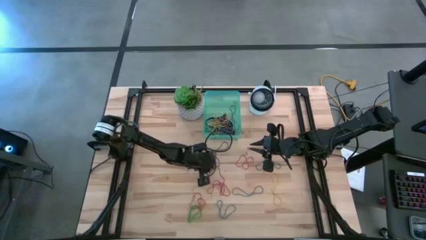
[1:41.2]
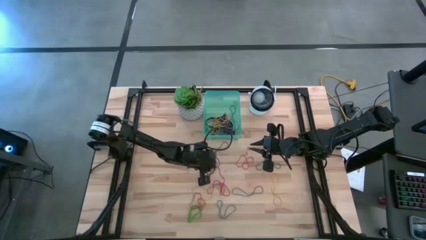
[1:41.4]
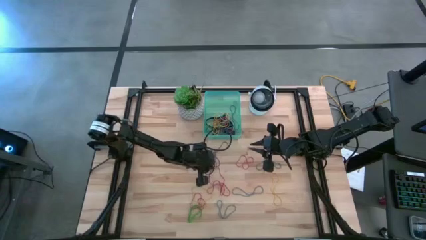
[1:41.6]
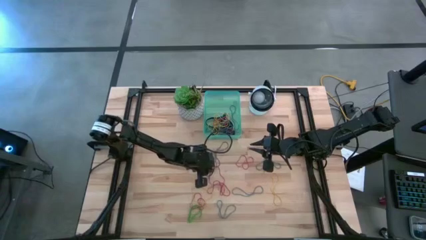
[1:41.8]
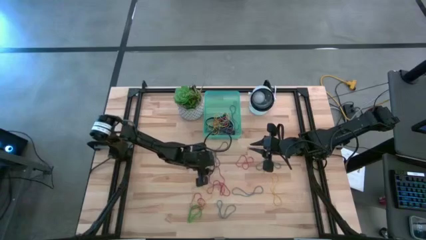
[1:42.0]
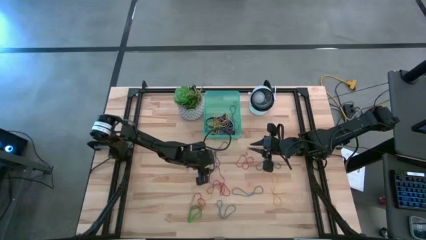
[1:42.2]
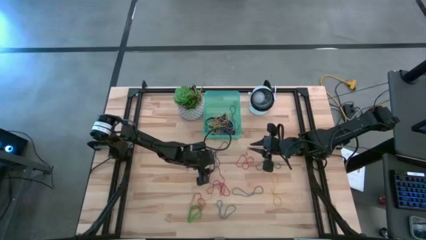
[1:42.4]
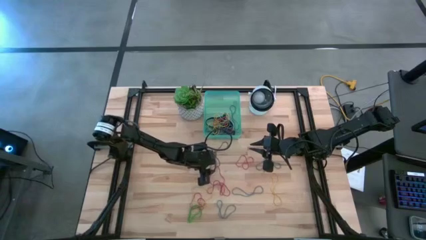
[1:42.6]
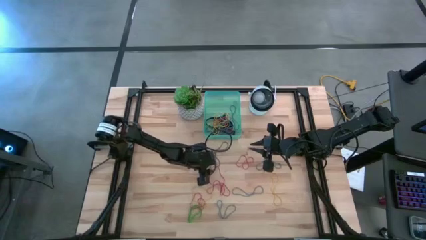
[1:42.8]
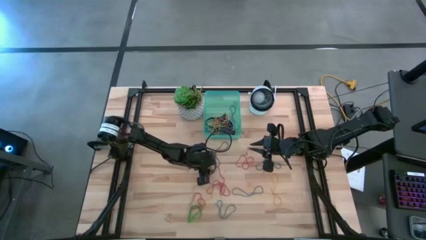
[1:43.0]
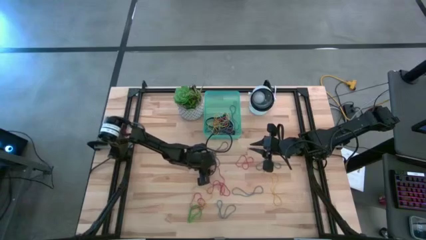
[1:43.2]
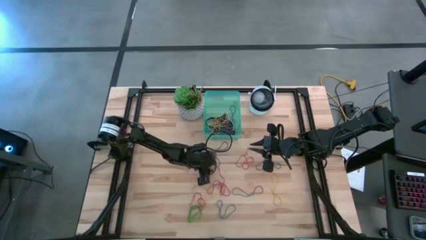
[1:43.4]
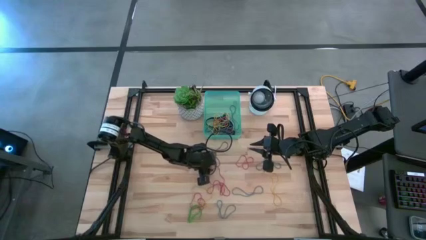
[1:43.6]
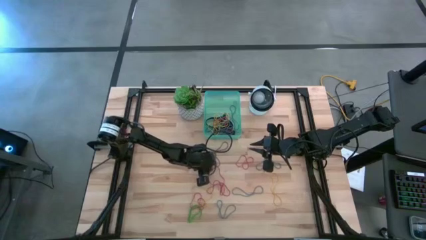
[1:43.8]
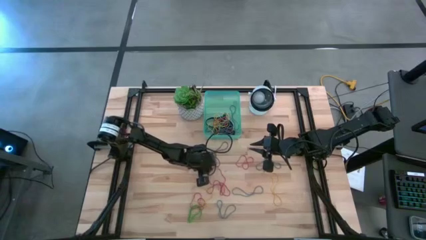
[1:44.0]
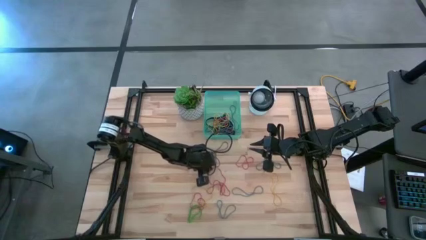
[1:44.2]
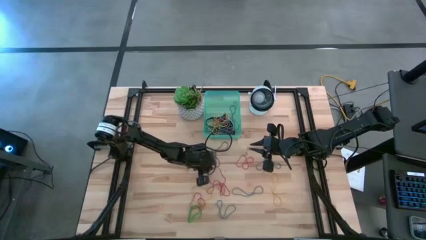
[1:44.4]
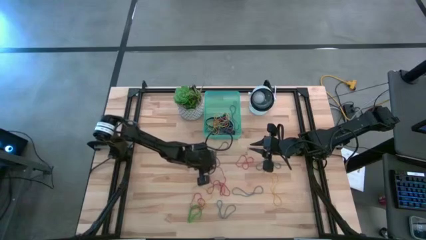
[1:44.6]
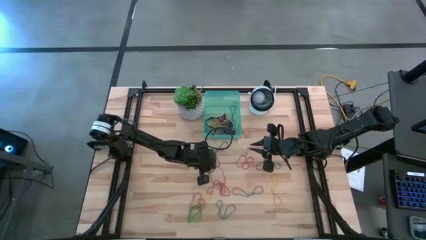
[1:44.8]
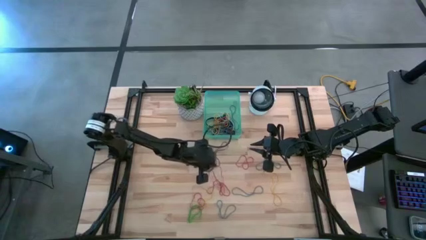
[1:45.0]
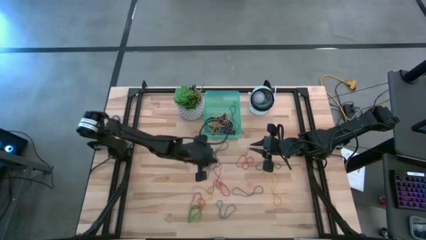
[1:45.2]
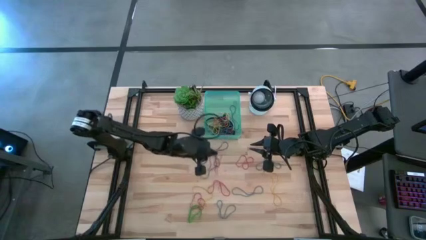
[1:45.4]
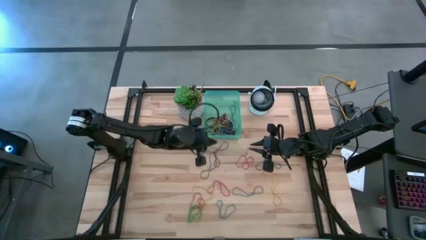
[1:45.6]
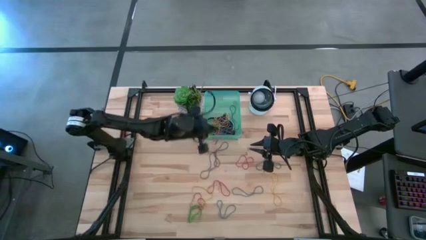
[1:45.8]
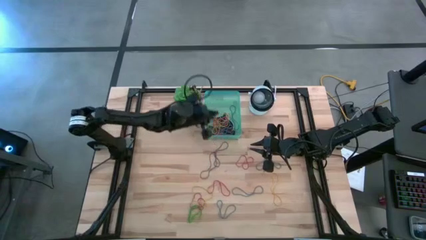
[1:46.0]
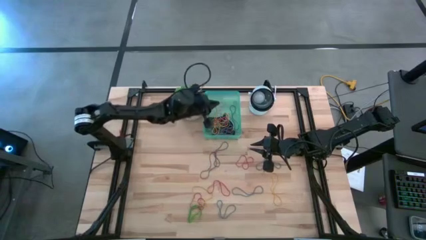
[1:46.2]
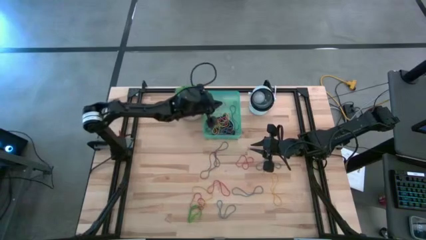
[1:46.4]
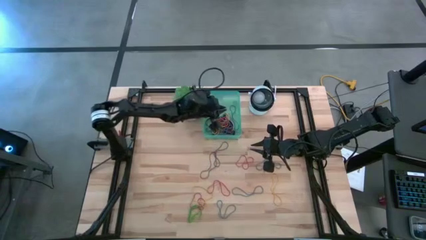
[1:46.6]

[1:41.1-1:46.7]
Task: Pick and place rubber bands into bin
Put the red rubber band into the green bin

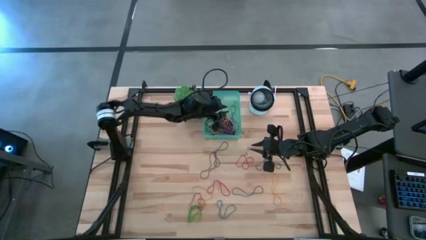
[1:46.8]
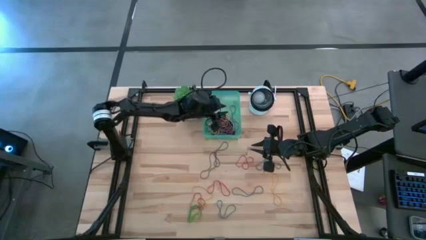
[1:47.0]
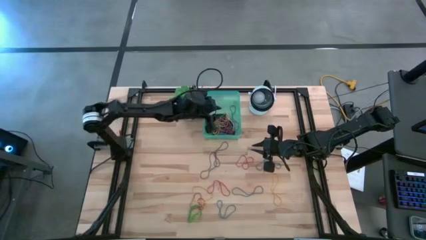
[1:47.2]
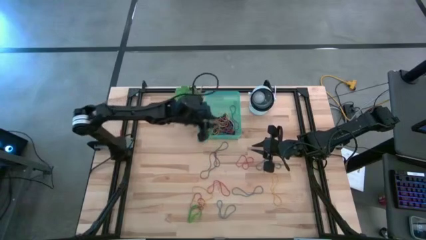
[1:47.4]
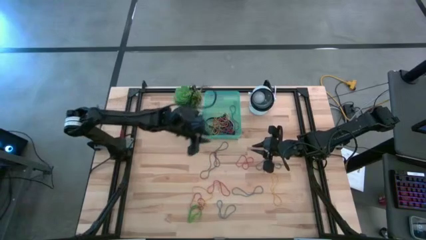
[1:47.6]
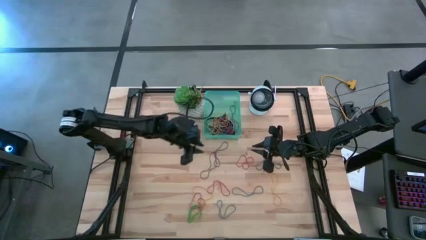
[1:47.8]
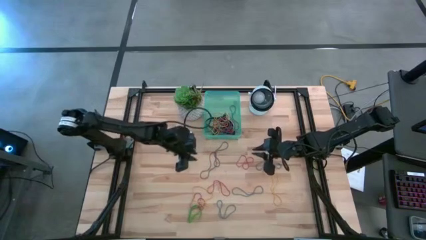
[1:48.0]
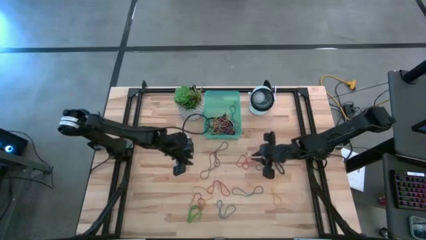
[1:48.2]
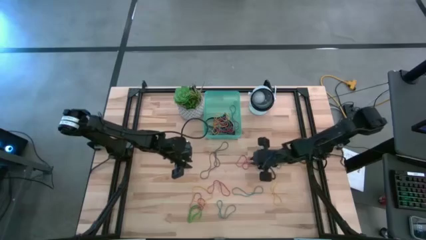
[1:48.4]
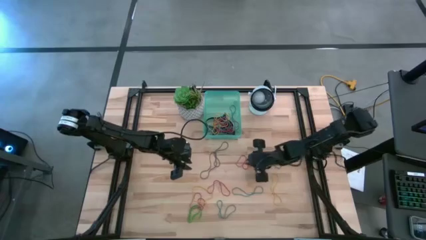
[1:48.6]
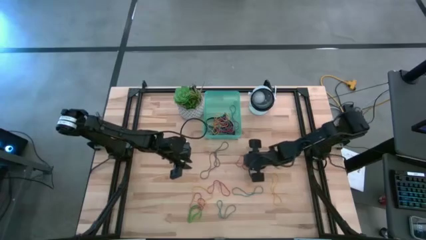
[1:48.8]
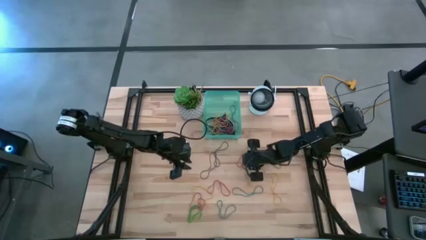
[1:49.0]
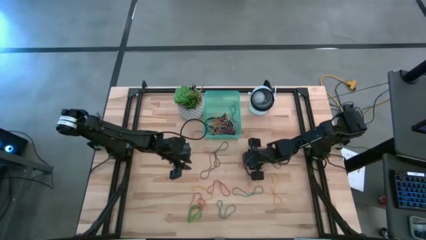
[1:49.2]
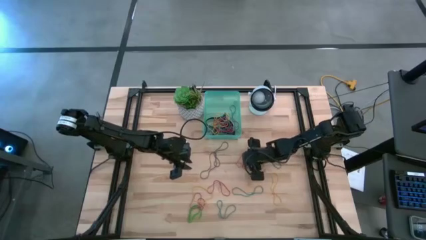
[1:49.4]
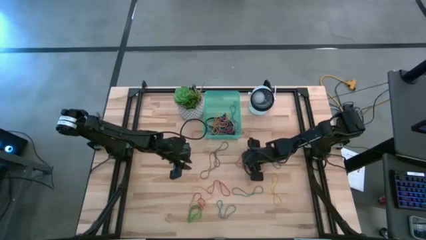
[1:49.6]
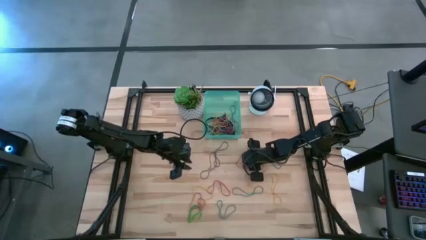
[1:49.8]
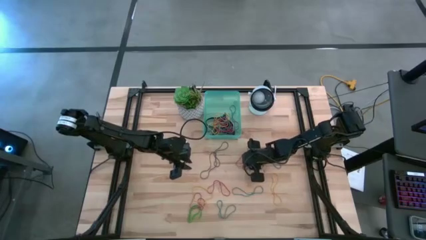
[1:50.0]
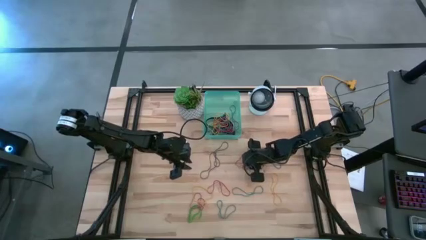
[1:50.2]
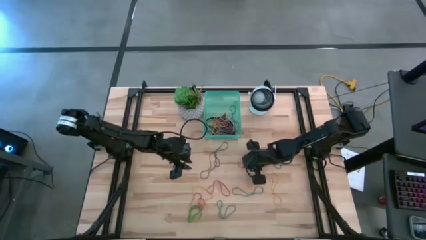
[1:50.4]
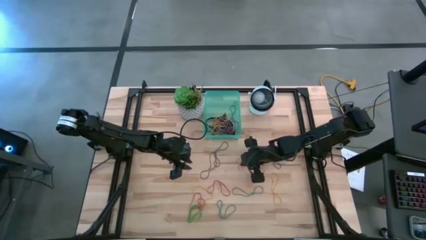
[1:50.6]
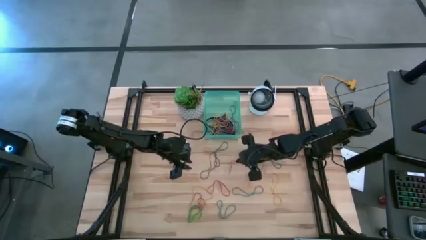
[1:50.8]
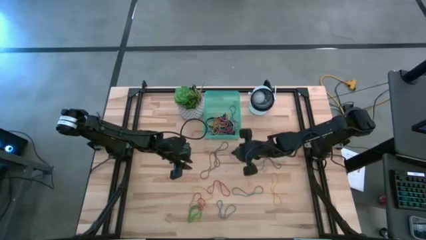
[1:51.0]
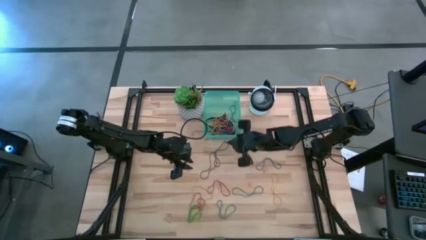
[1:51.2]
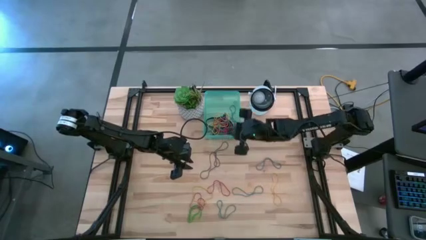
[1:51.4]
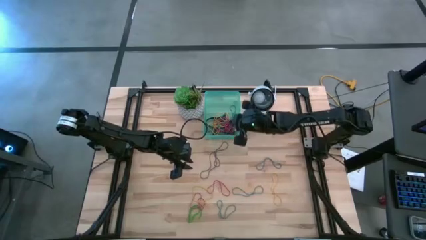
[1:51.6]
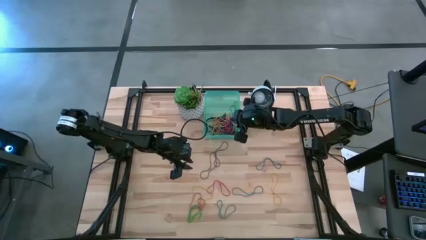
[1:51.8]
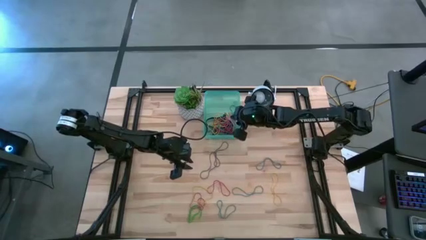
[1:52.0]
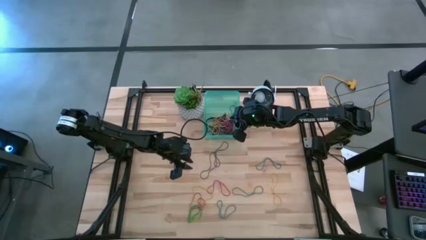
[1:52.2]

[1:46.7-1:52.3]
Put the red rubber band into the green bin

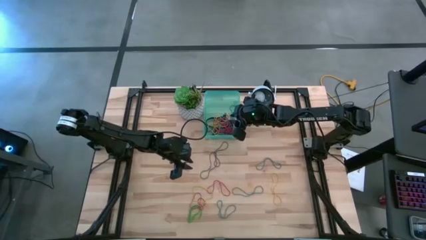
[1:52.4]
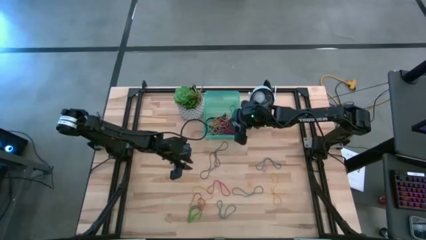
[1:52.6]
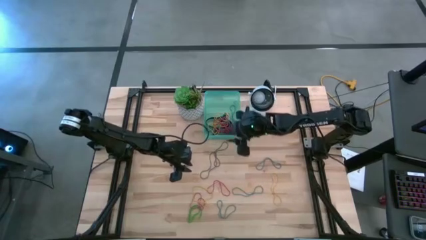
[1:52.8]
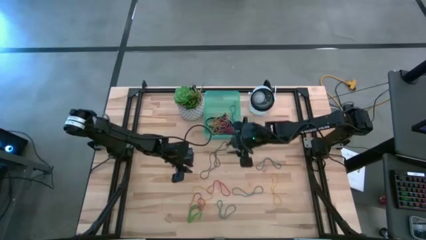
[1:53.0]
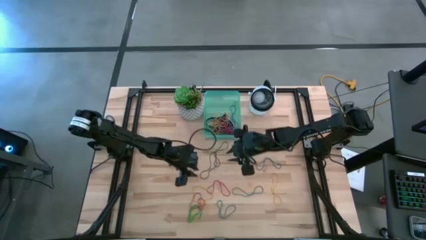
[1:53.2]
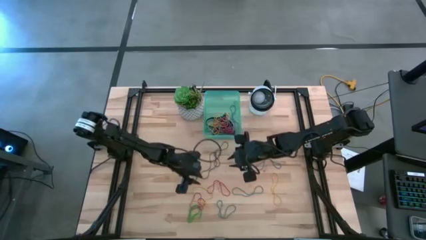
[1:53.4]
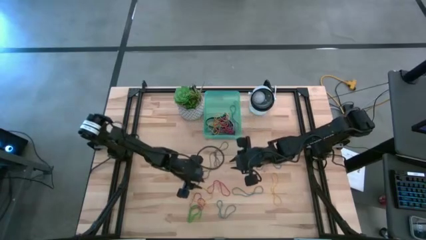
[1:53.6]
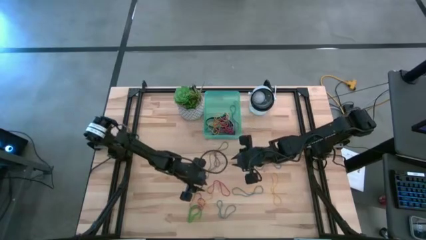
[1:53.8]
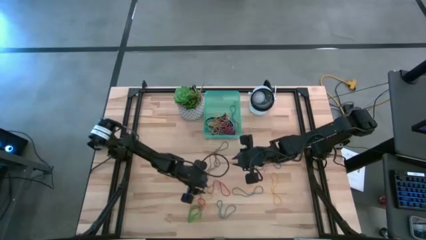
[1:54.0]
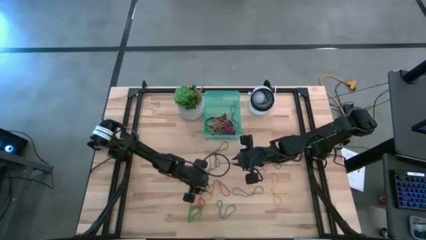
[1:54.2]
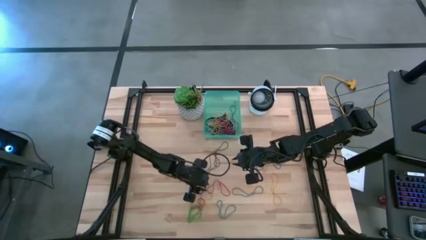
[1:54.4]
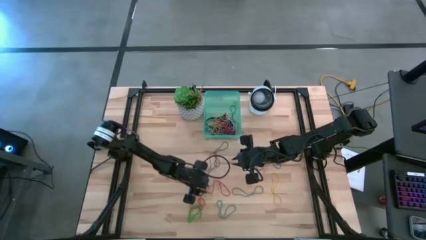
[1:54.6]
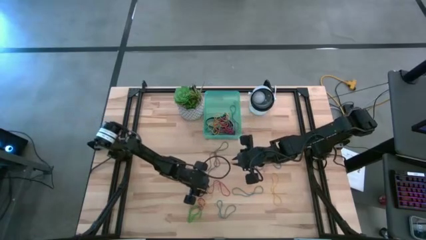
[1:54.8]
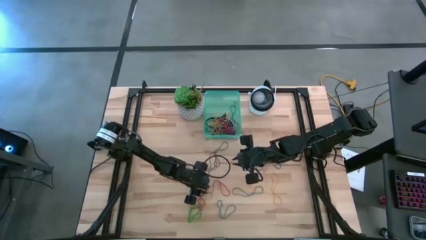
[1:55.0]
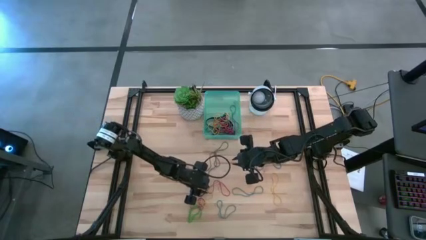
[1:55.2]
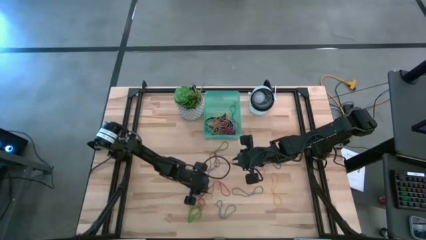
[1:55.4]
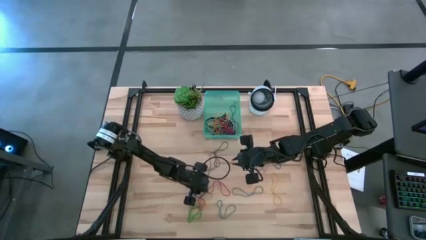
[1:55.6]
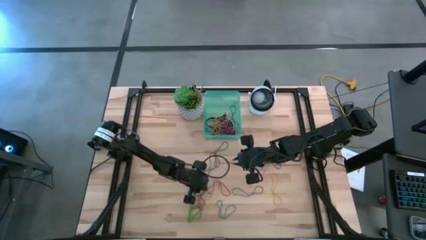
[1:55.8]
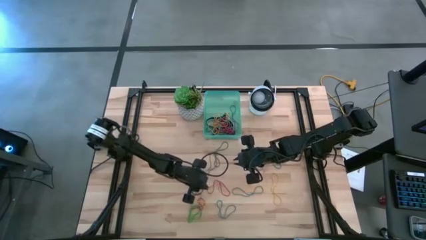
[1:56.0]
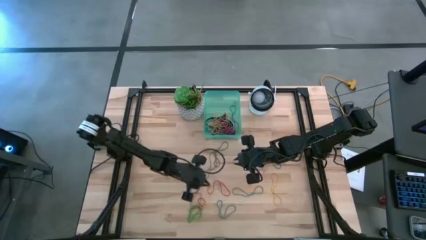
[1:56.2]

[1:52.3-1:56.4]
Put the yellow rubber band into the green bin

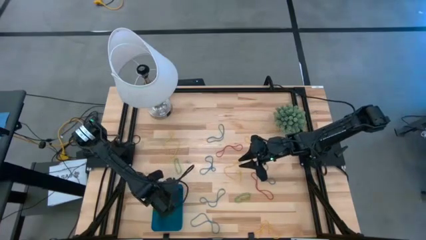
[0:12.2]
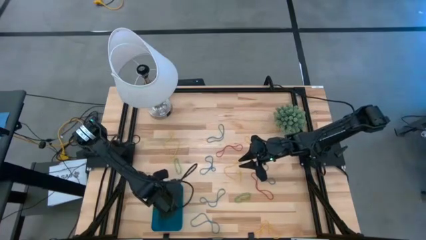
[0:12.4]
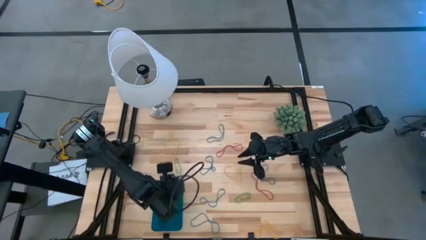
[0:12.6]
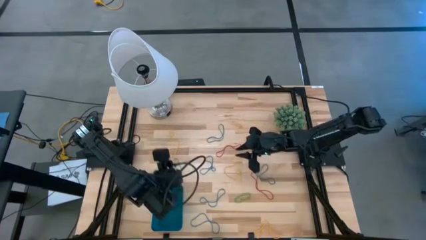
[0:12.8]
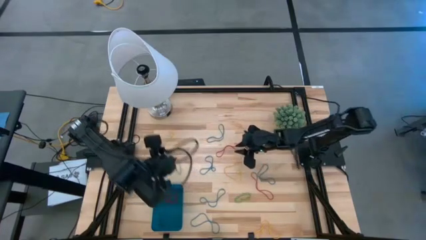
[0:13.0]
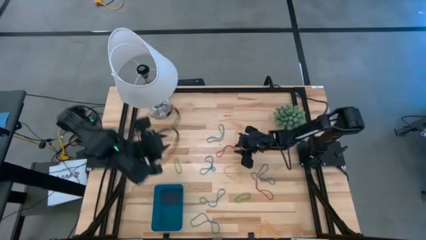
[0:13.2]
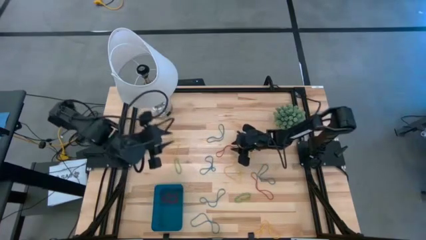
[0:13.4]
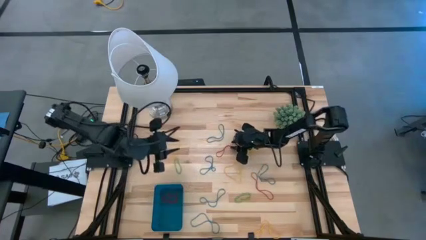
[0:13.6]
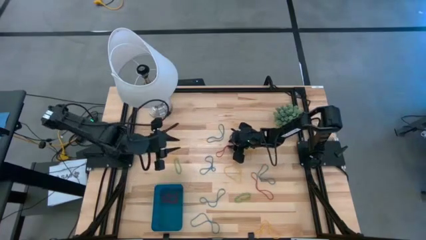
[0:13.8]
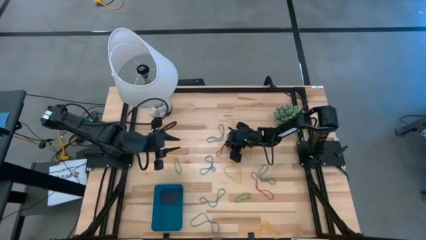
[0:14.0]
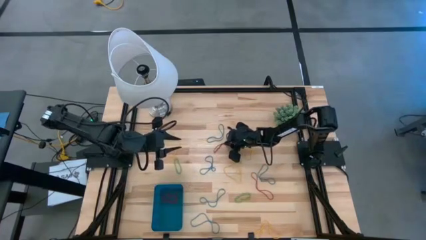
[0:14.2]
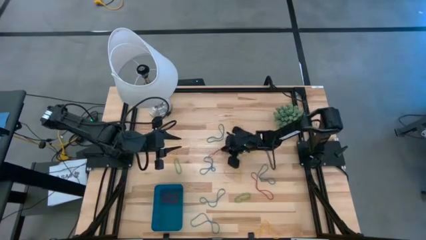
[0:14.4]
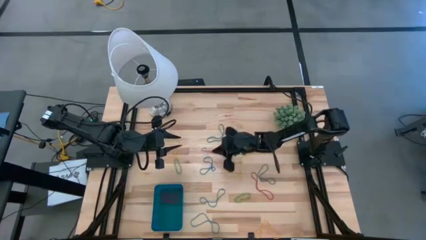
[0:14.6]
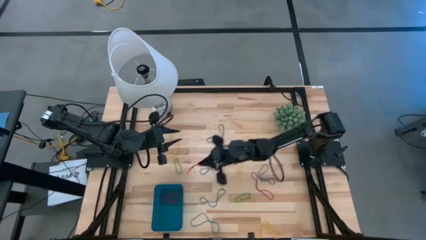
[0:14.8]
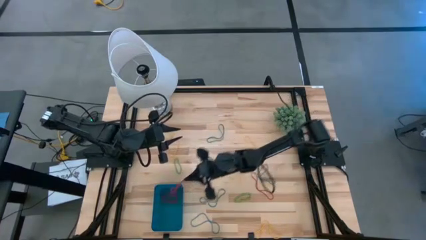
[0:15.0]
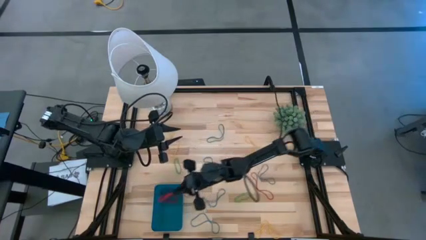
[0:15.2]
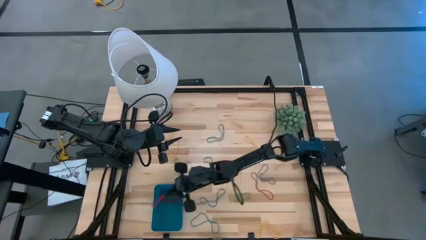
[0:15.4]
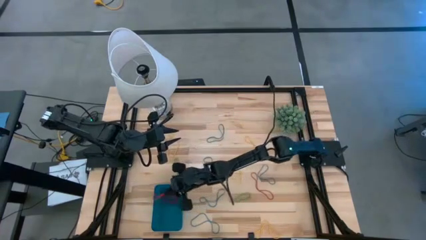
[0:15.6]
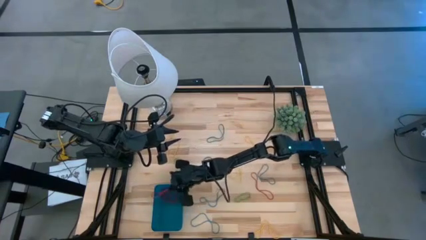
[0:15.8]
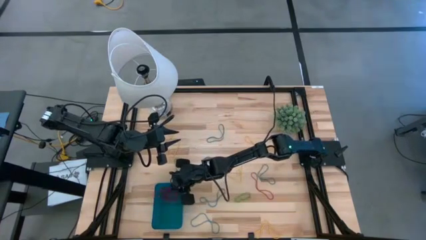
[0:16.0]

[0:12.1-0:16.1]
Task: Pick and place items into bin
Put the top red rubber band into the blue bin
